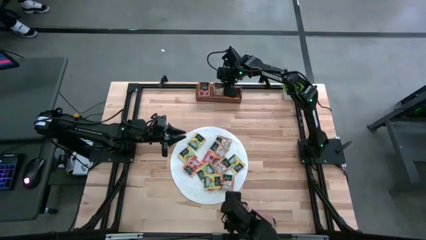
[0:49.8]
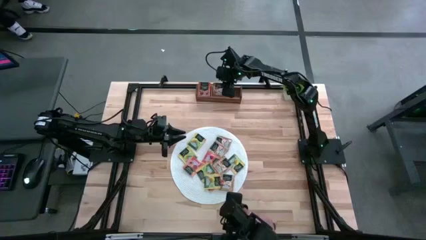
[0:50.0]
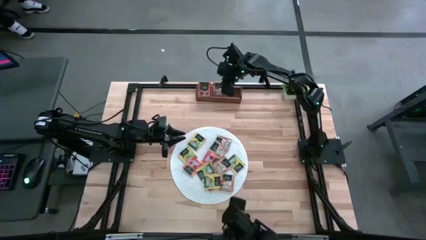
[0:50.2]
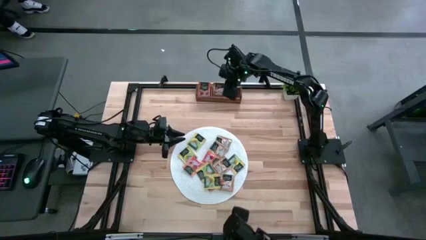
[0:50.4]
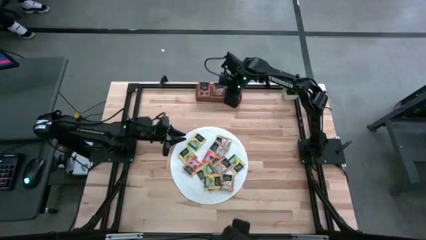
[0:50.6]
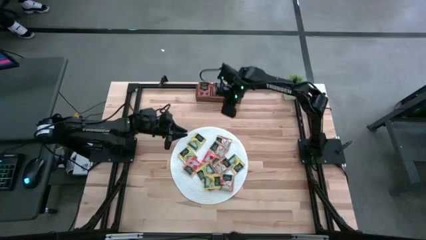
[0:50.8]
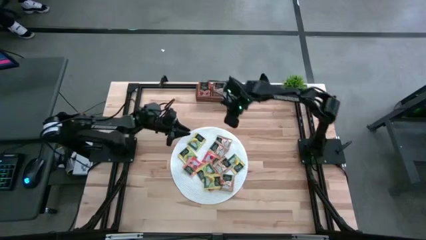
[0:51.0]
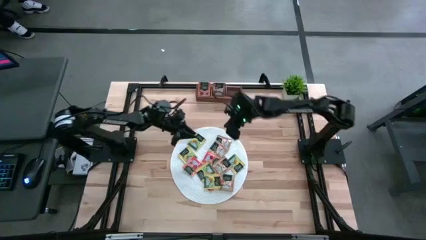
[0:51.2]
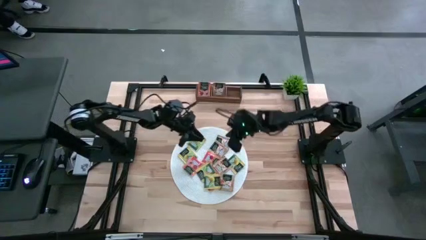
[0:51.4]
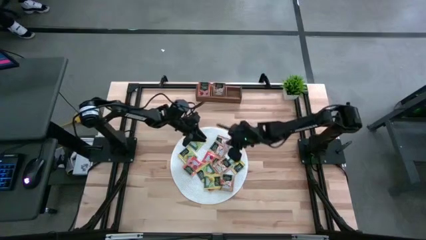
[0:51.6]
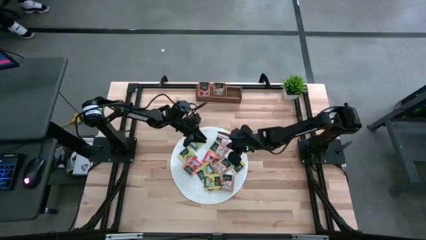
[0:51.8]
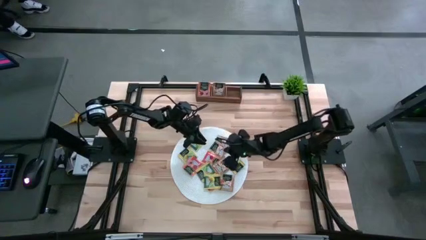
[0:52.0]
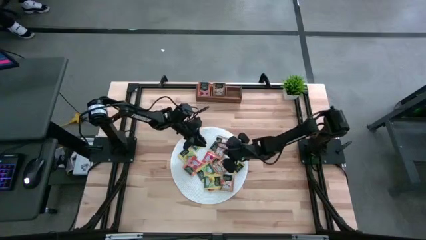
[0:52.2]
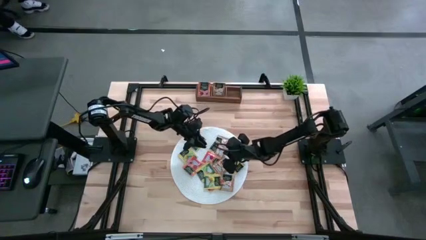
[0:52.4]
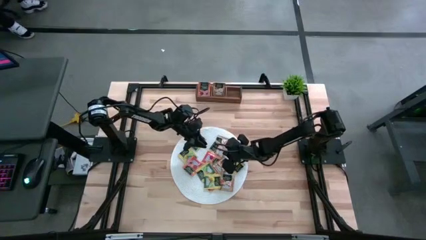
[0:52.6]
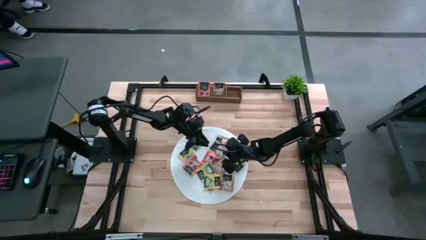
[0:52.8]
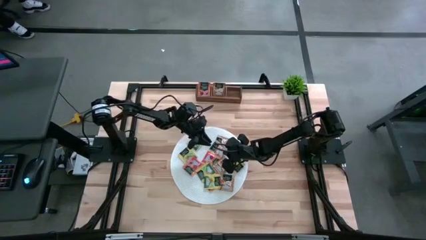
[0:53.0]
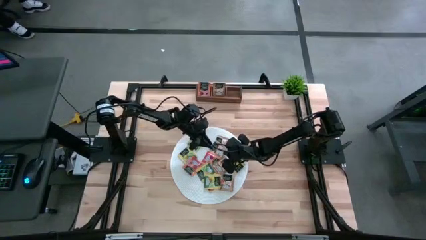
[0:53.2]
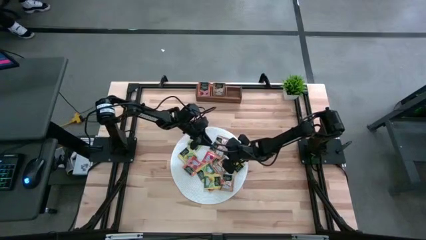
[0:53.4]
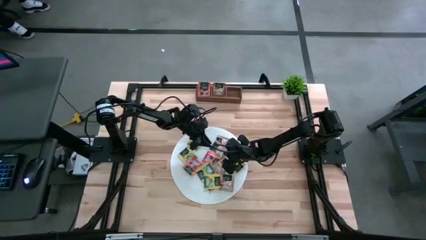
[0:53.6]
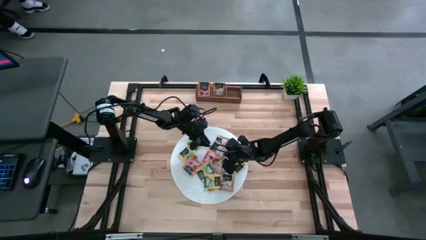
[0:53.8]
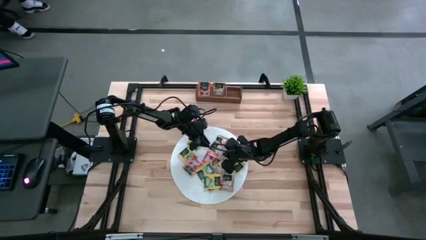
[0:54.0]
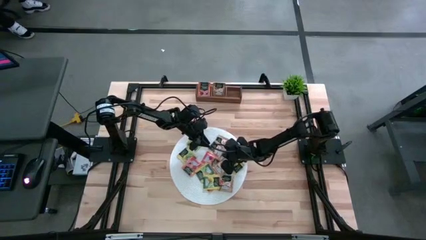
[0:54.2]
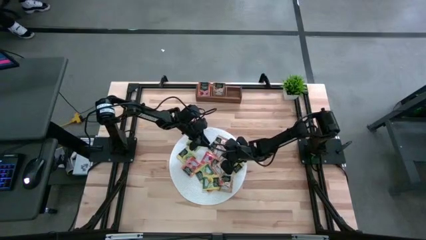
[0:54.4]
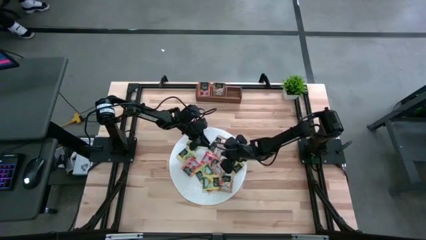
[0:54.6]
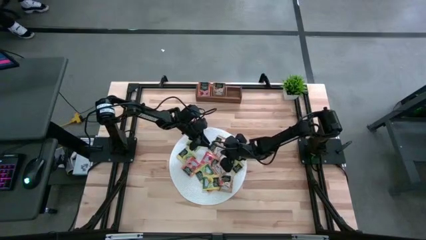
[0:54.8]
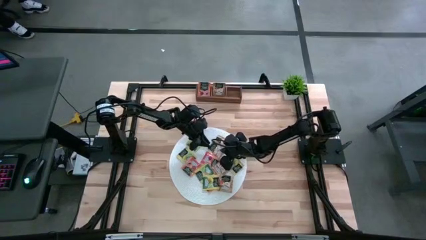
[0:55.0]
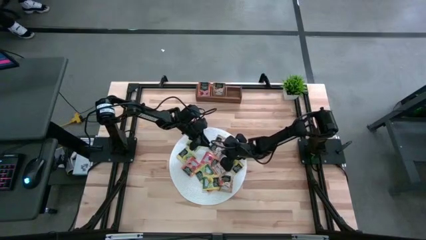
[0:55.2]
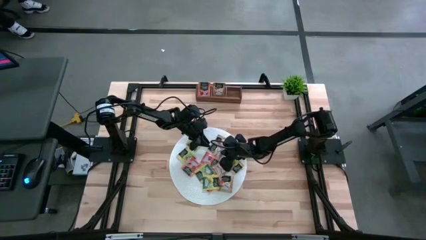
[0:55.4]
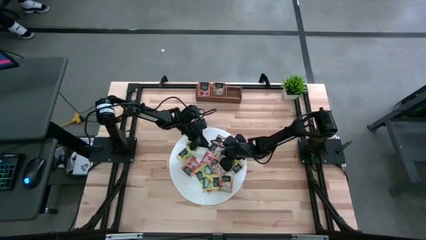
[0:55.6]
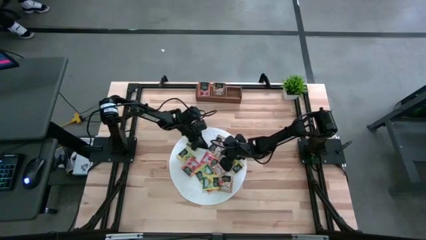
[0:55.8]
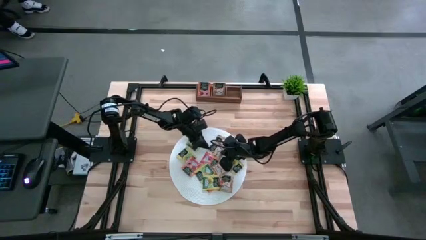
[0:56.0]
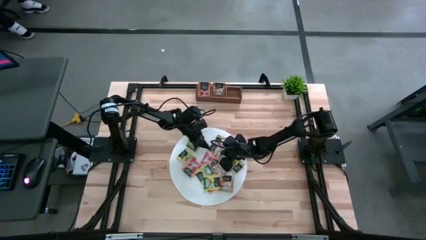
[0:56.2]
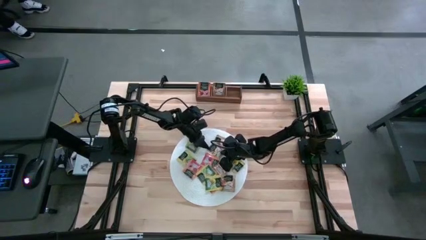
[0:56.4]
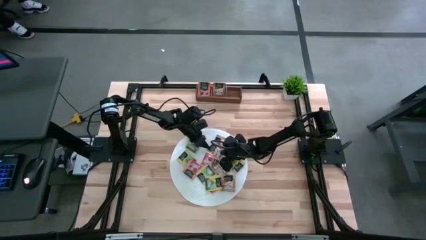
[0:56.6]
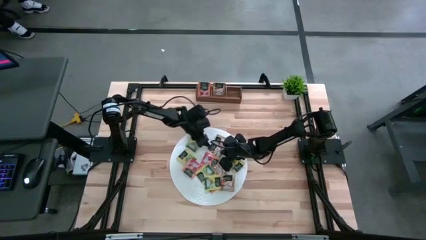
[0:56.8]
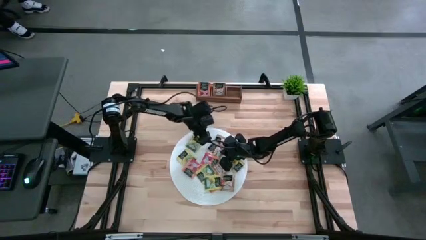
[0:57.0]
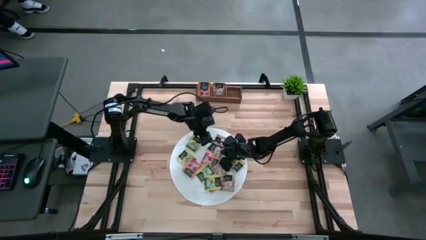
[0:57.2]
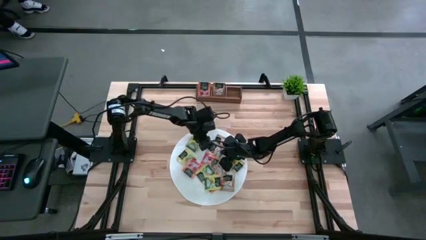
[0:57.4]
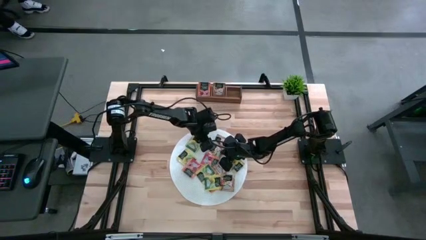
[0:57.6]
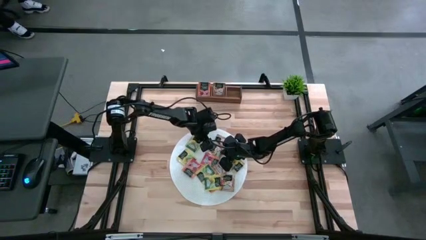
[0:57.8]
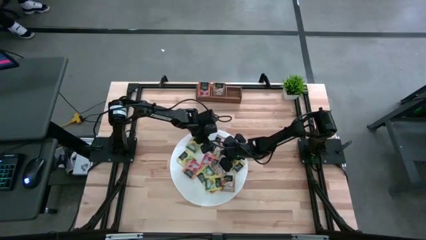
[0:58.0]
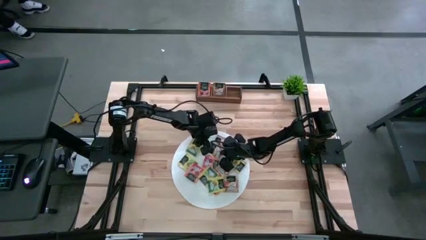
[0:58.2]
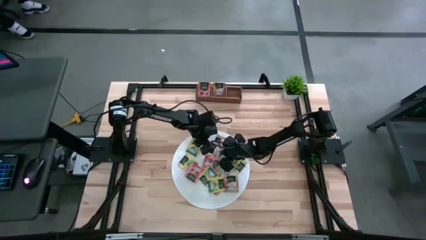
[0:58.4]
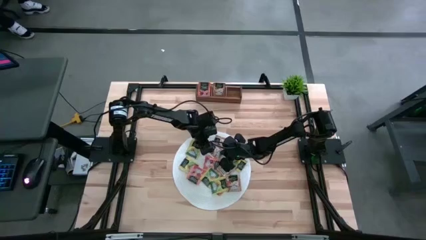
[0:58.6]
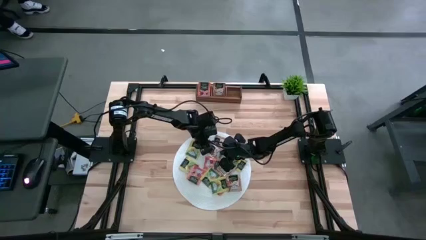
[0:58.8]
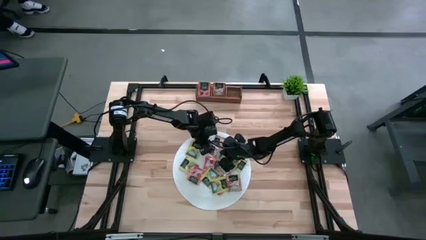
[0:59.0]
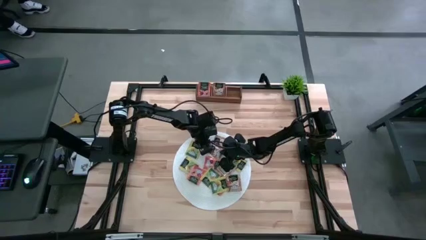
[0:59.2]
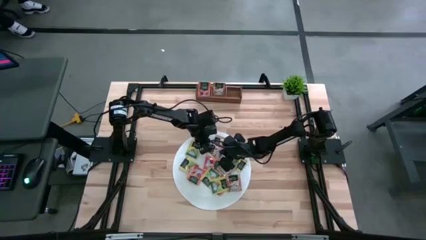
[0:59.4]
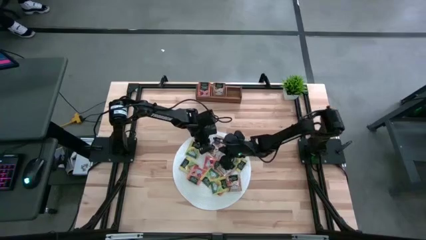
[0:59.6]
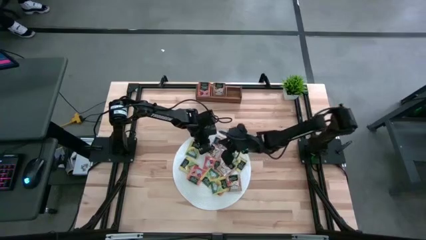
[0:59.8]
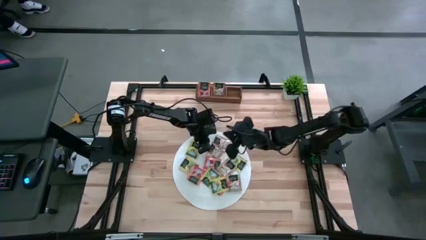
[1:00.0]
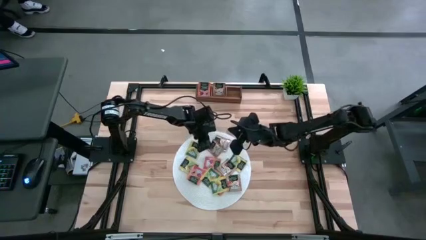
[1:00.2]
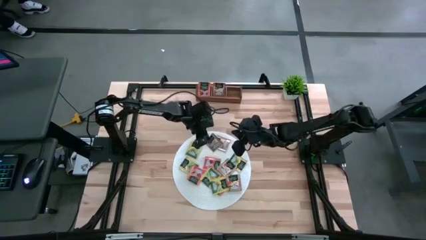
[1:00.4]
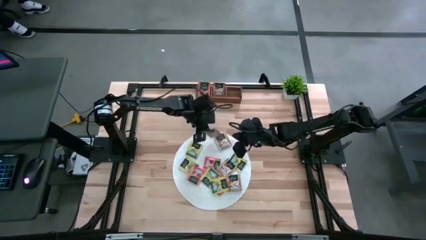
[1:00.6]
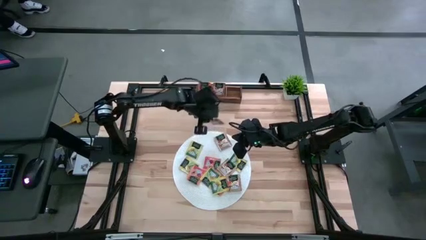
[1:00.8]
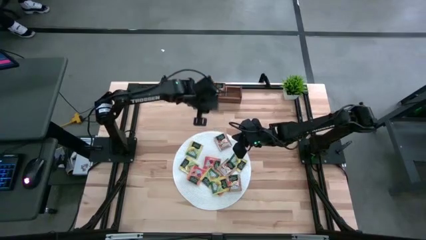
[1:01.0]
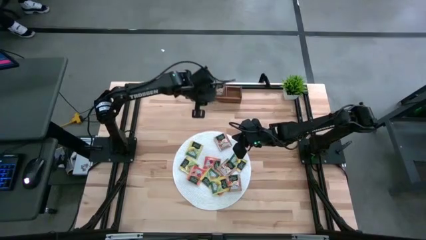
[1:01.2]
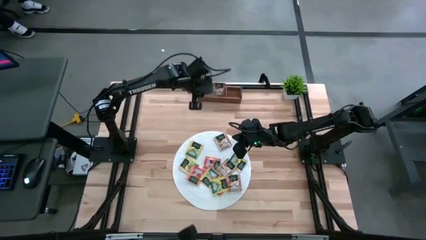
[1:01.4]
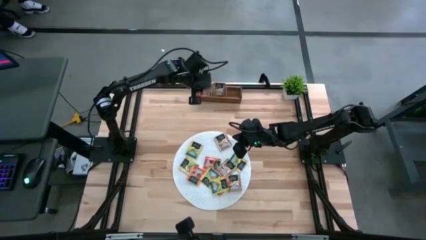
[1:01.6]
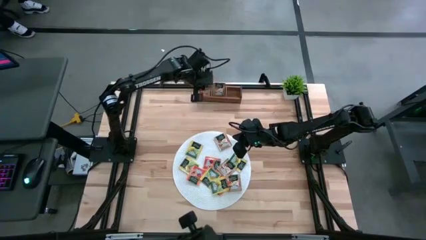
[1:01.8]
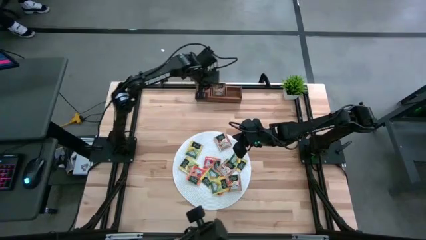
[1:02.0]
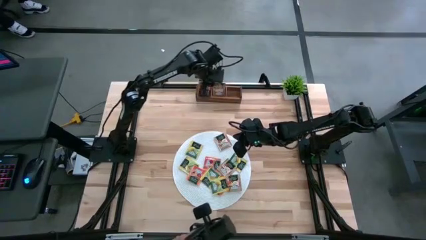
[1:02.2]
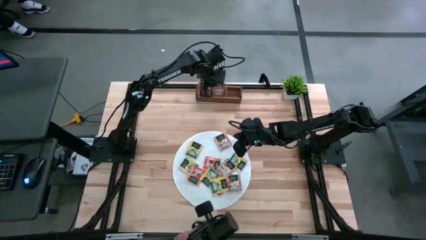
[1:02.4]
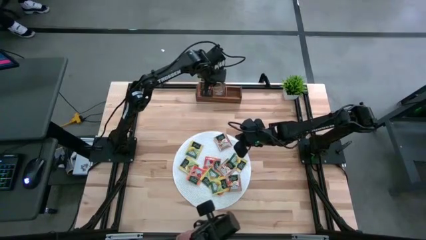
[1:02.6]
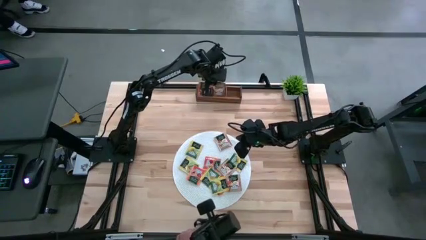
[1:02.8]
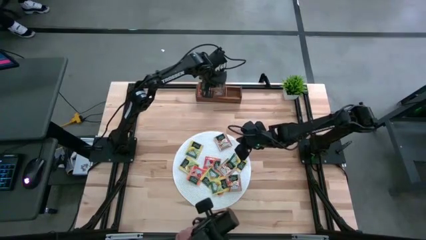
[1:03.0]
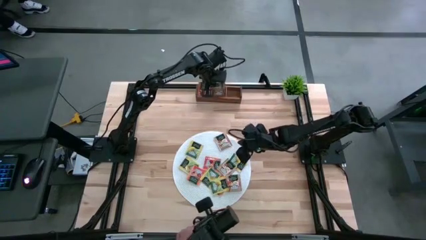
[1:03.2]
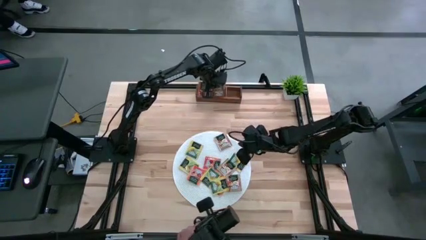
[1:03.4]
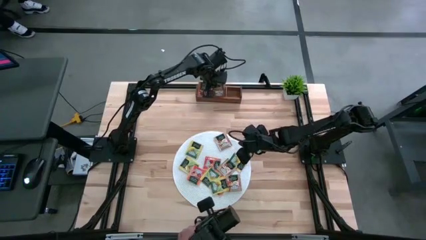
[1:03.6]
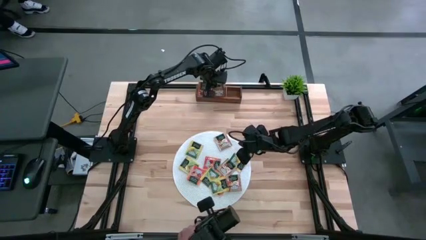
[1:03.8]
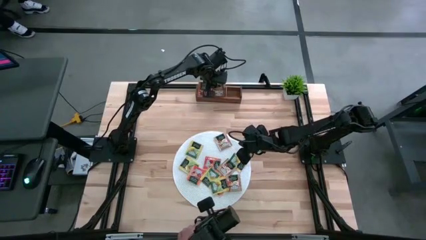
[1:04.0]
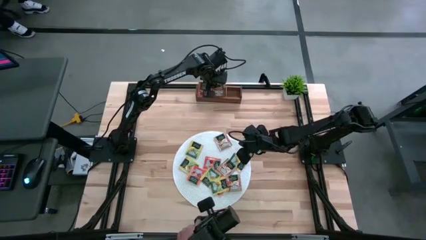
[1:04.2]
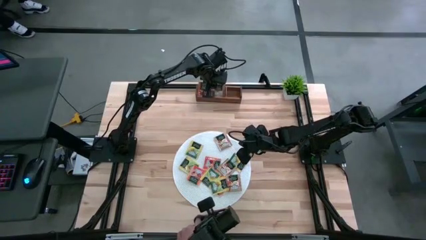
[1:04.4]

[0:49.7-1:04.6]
Task: Pick & Place Tea
Put the brown tea bag into the middle section of the wooden organizer
